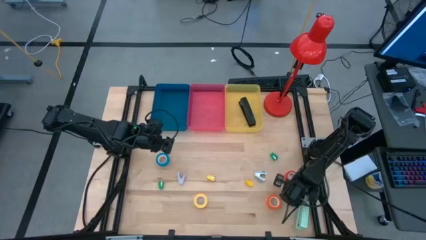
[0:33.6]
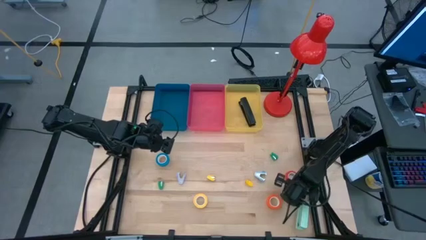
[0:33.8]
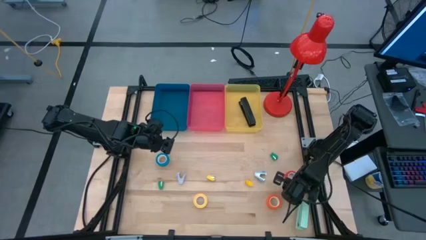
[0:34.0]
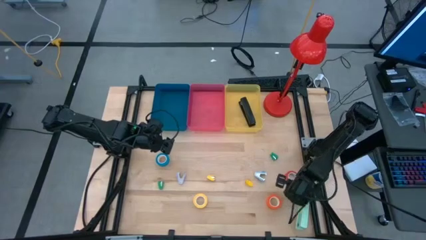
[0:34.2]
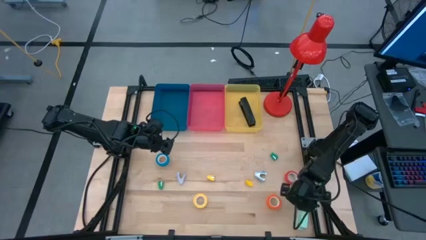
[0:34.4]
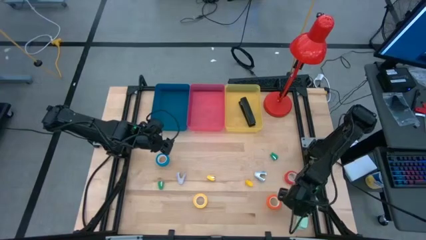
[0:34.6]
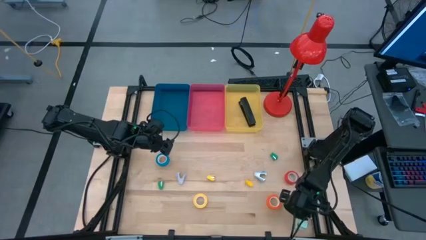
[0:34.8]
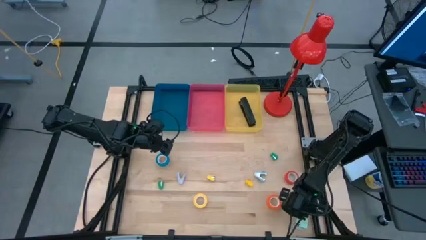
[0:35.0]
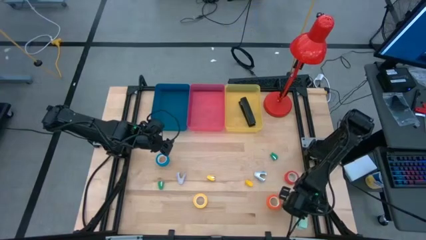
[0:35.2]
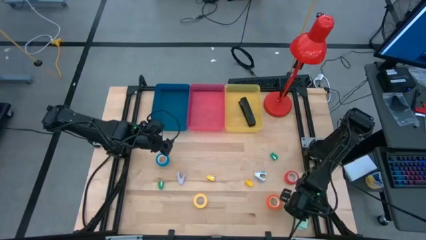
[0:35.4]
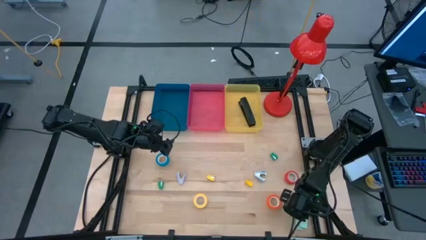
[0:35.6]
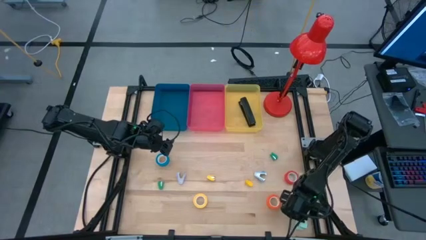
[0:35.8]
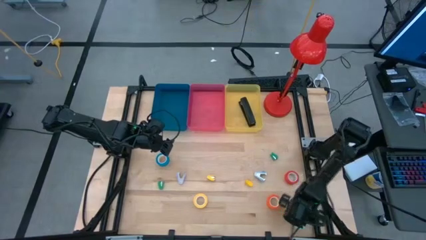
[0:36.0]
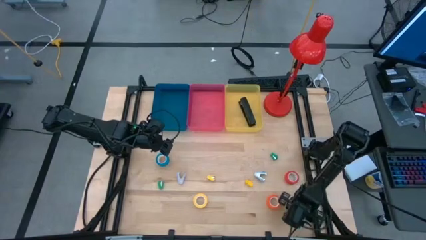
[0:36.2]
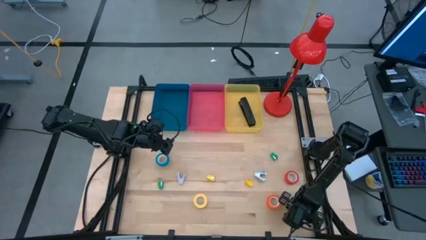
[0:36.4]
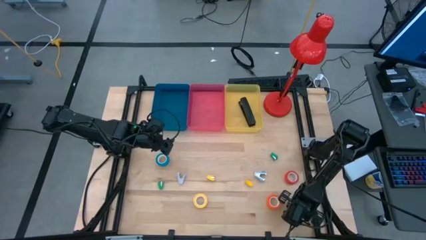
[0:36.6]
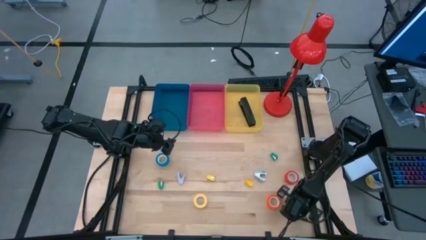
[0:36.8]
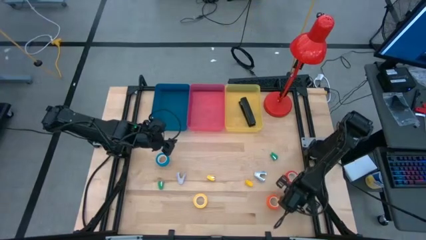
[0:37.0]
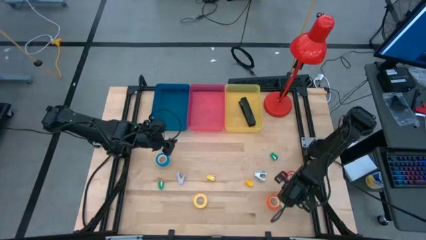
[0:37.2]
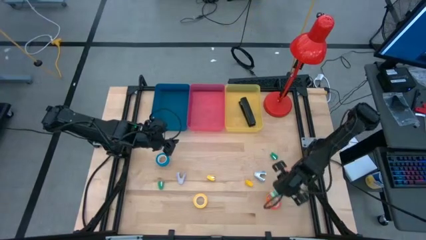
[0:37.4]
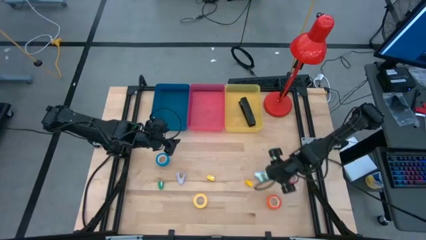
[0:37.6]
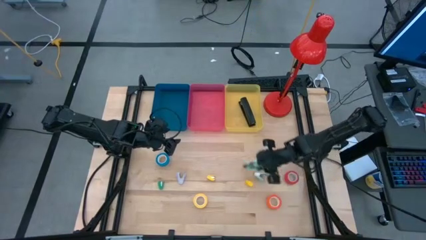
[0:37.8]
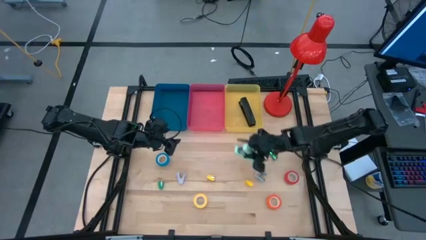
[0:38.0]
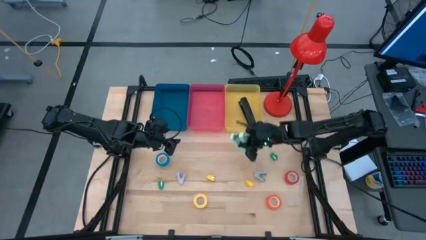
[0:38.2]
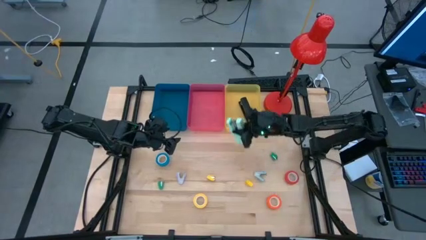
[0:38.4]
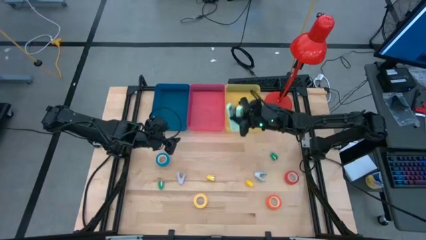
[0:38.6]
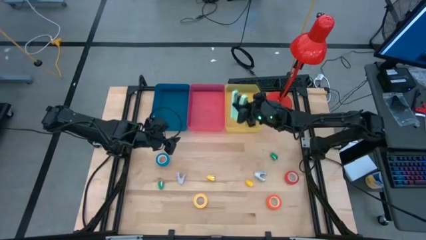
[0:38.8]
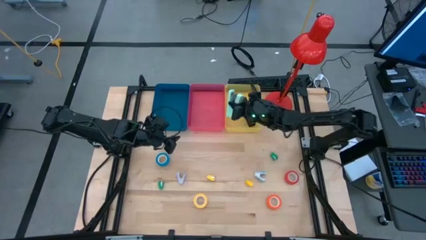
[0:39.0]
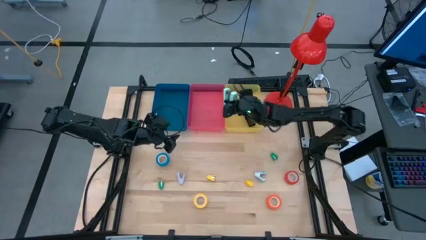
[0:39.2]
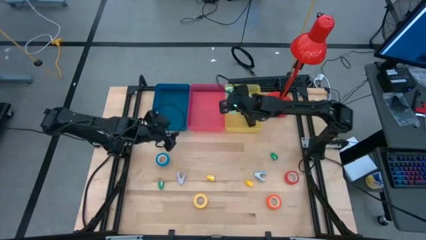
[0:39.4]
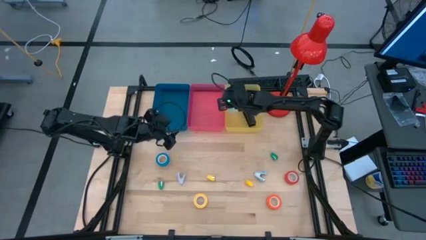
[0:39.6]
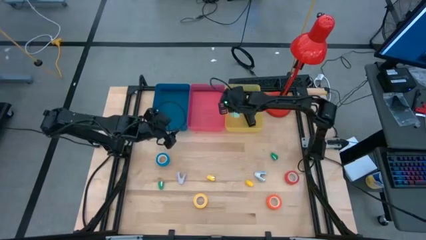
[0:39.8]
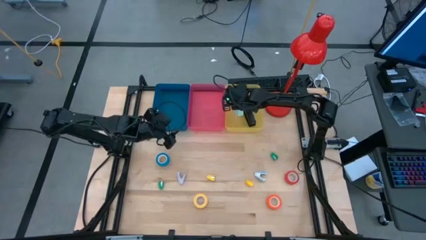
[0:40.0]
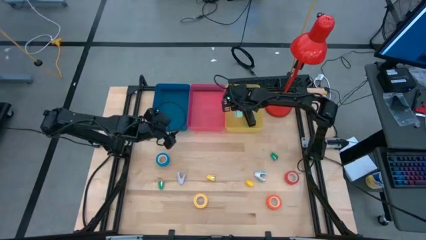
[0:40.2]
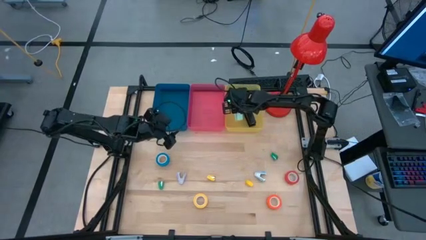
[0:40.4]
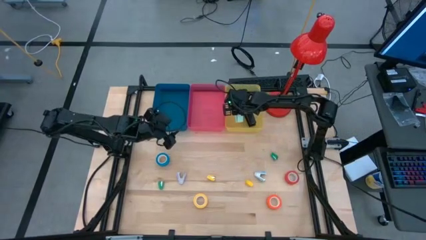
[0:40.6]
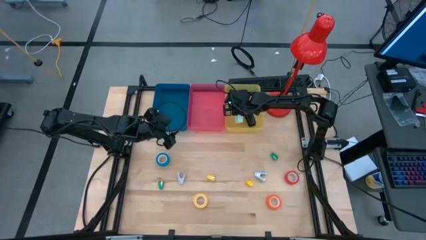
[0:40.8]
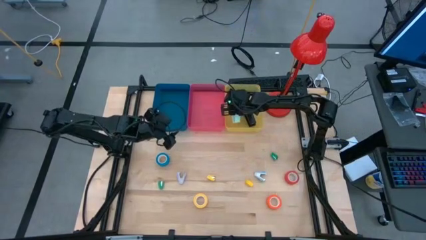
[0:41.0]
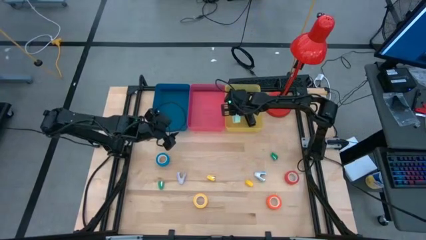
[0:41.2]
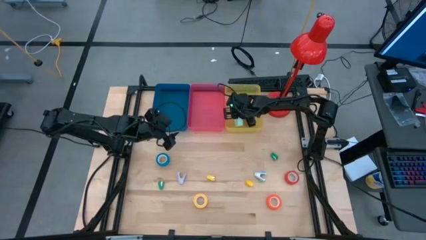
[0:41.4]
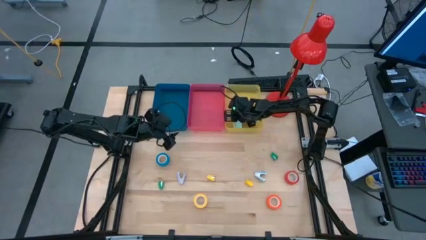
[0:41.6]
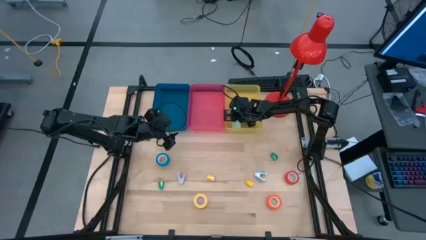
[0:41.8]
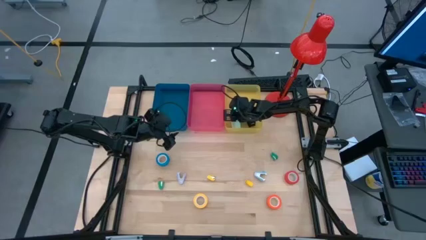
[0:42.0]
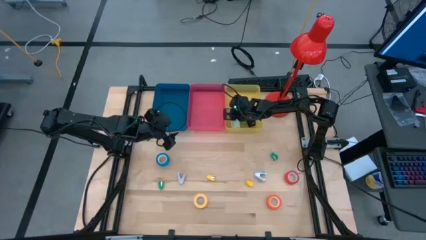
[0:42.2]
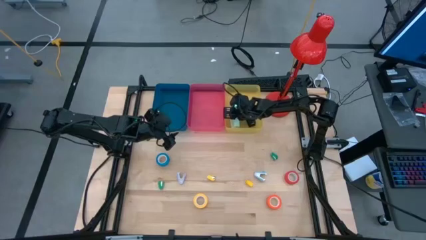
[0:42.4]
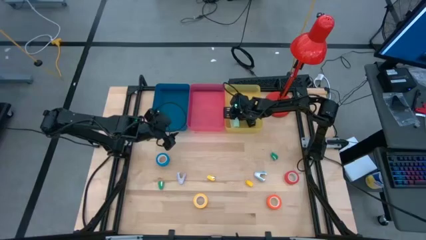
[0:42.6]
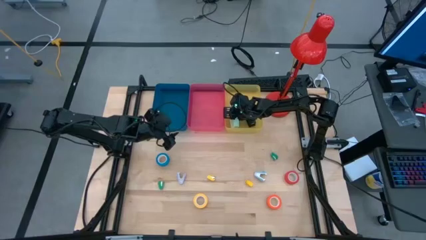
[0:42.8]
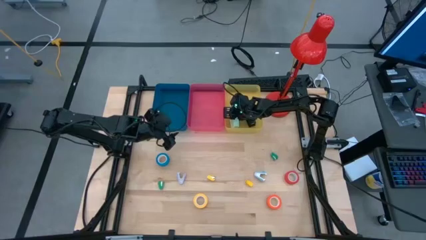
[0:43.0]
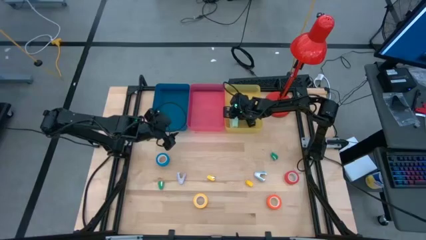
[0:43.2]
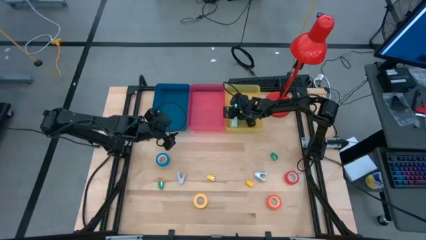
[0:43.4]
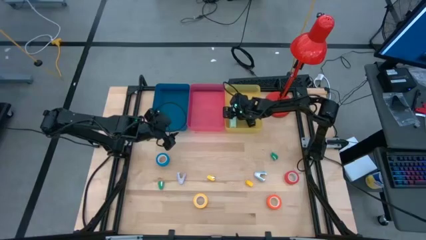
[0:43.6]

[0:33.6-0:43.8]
Task: Pick and place Stapler, Stapler remover, tape
Put the large light green stapler into the yellow bin

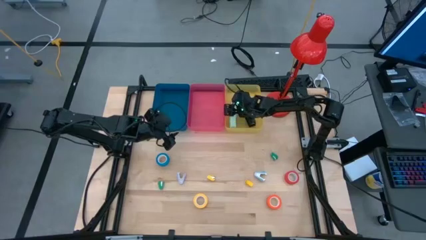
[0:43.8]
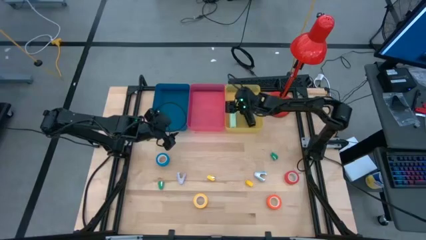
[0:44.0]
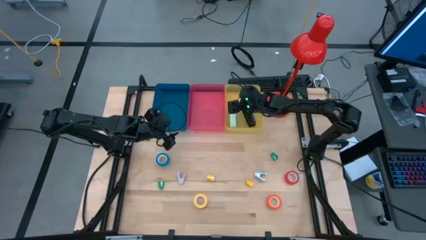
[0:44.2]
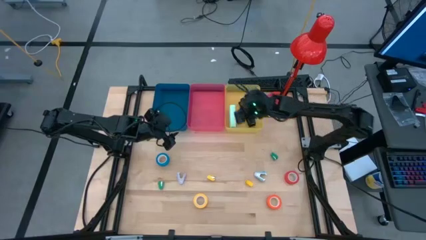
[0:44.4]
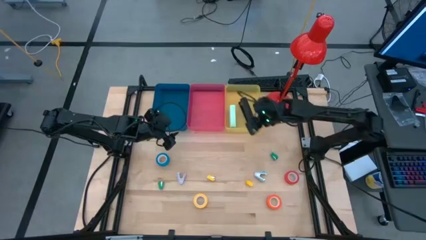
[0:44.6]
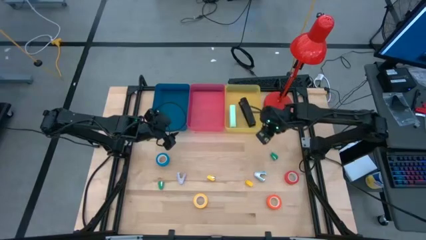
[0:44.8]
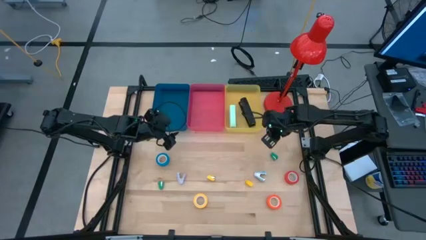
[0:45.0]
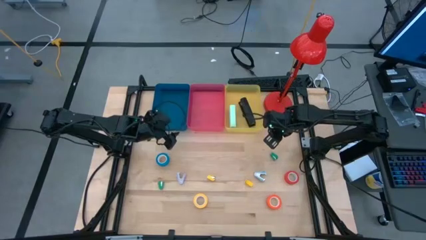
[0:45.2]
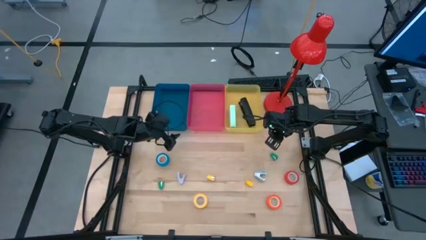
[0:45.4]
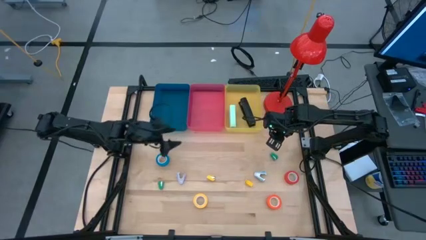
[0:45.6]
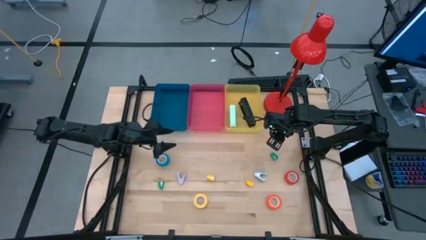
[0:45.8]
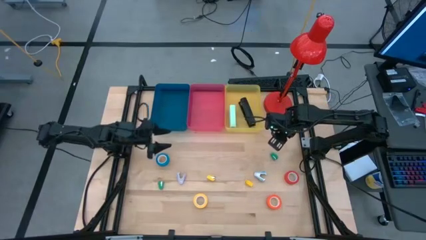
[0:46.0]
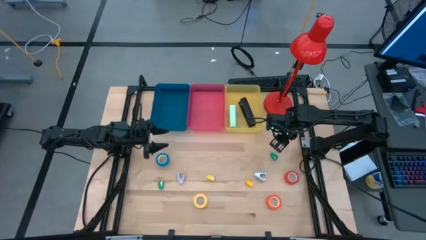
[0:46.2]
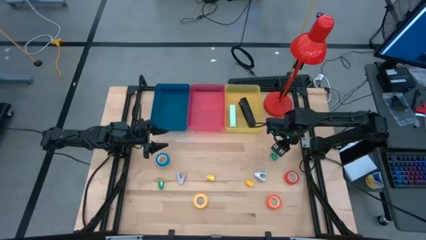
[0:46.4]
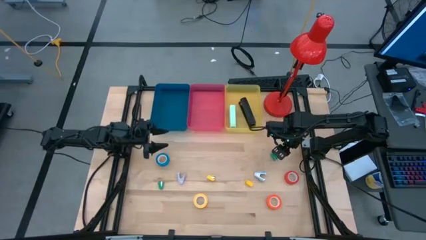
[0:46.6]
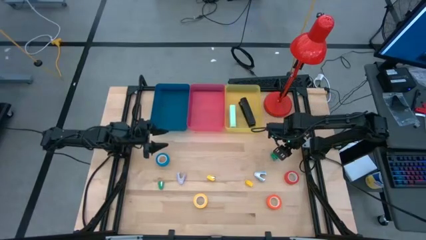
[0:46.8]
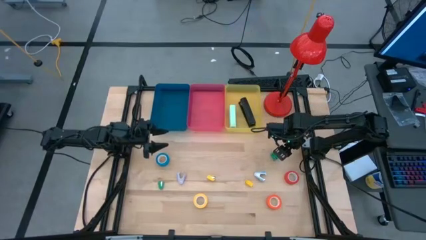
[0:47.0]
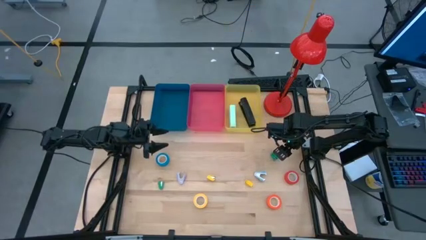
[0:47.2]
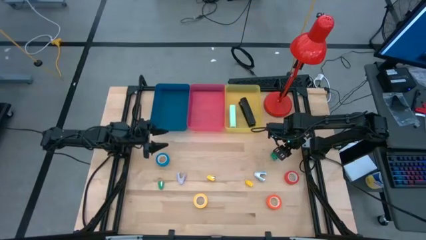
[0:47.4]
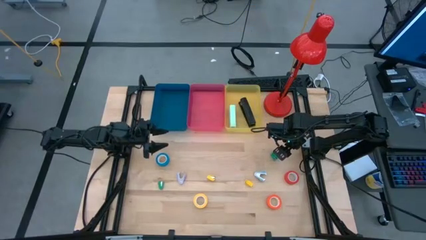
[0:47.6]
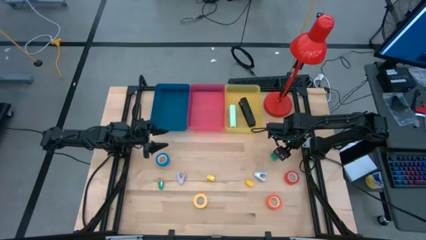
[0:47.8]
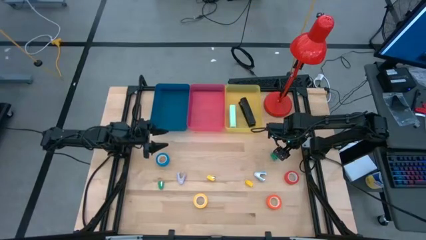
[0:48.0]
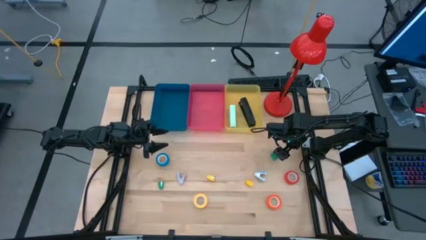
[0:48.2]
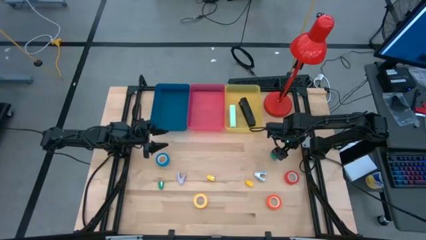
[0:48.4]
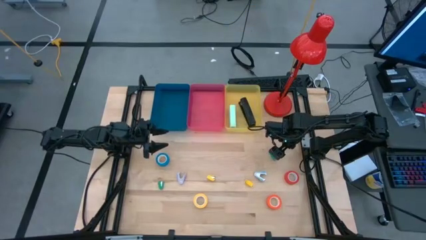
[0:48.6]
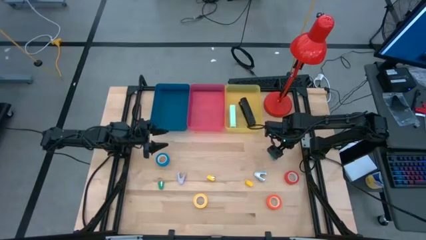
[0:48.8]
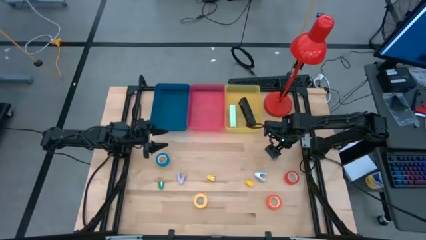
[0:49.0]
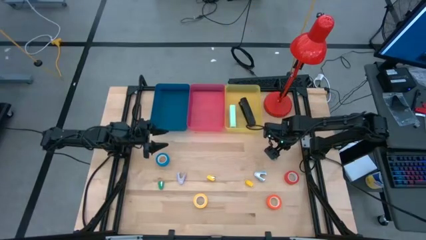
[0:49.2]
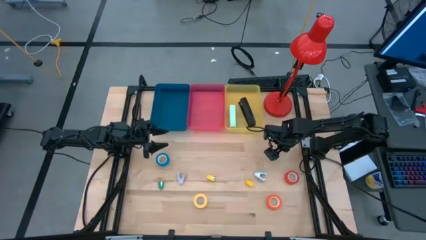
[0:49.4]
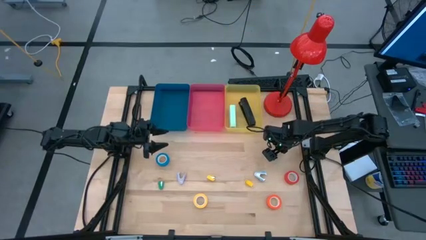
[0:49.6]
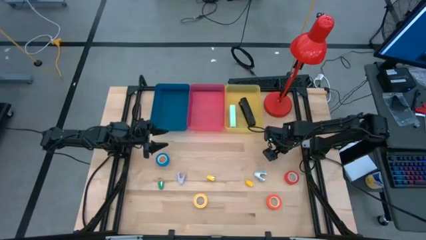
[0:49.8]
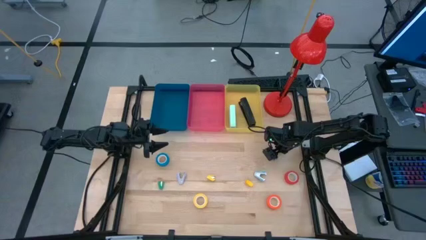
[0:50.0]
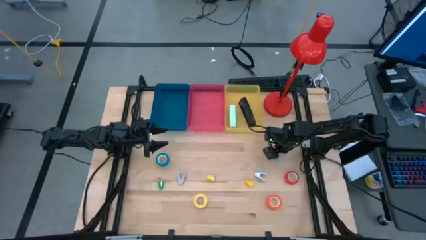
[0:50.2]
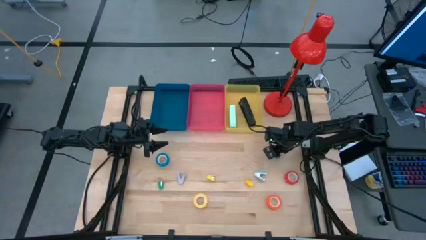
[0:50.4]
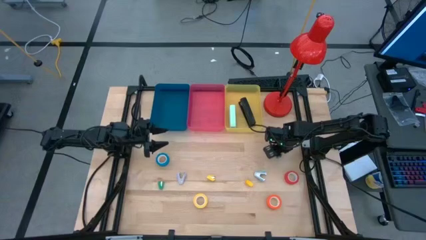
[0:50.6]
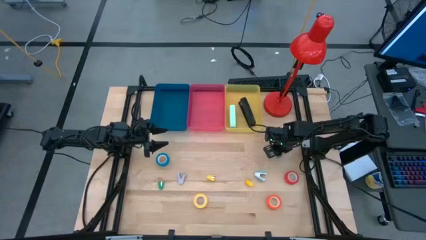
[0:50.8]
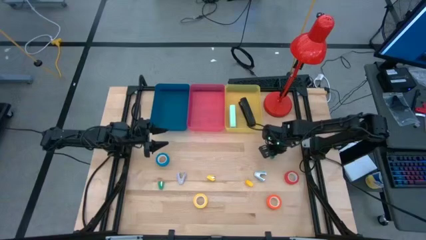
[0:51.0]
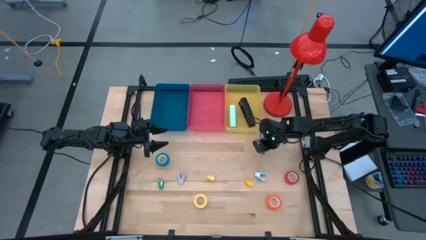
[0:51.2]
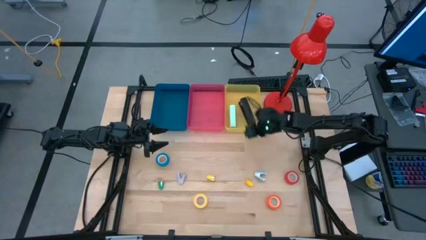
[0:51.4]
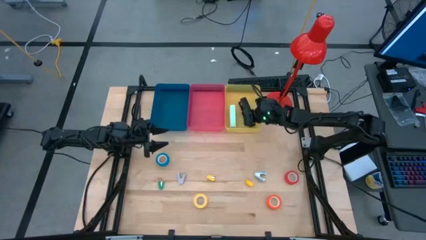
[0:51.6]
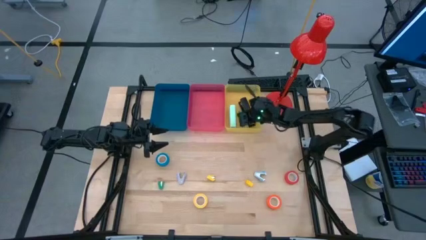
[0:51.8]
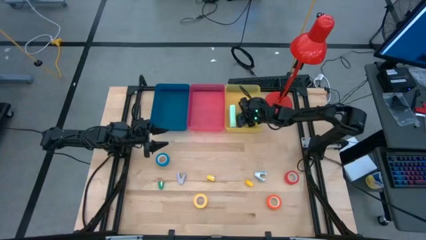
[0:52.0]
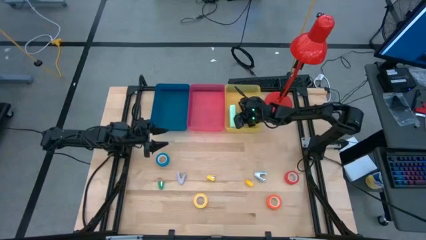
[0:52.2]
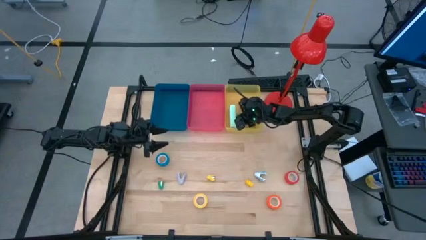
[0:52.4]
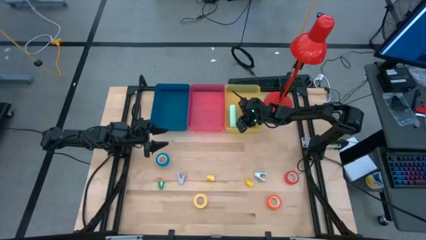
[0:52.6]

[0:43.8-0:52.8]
Put the top small green stapler into the yellow bin
